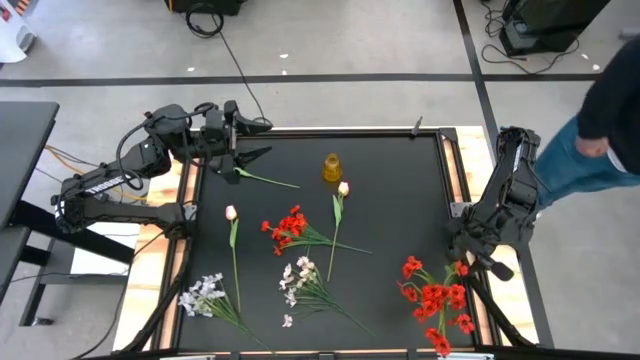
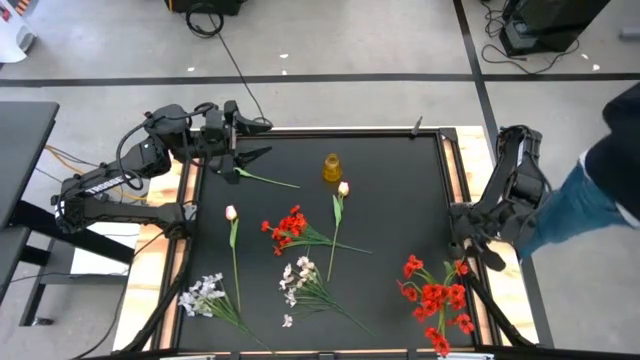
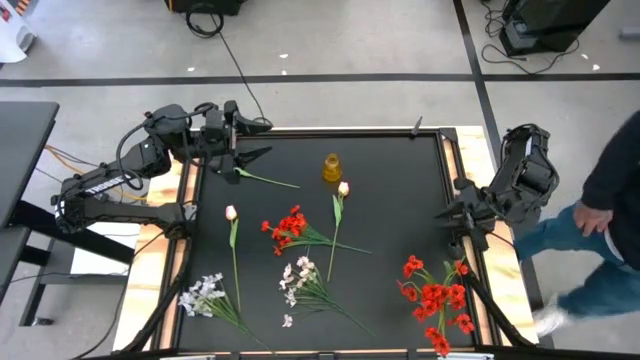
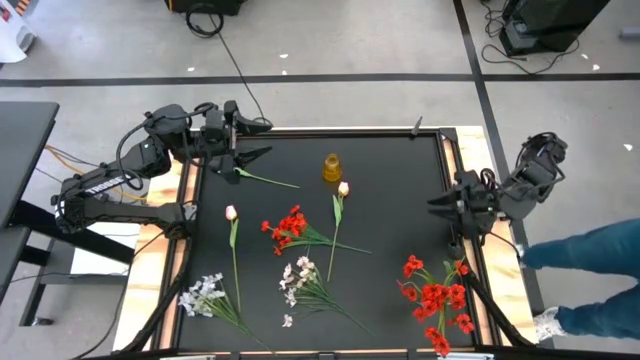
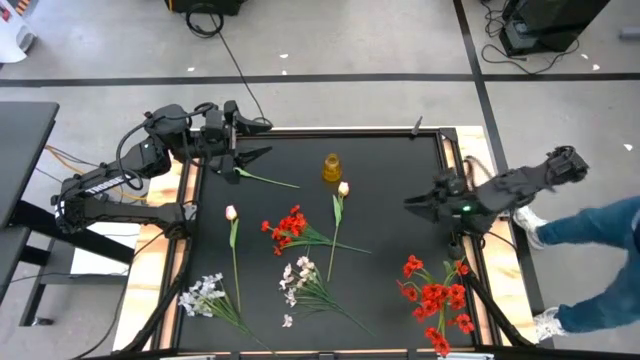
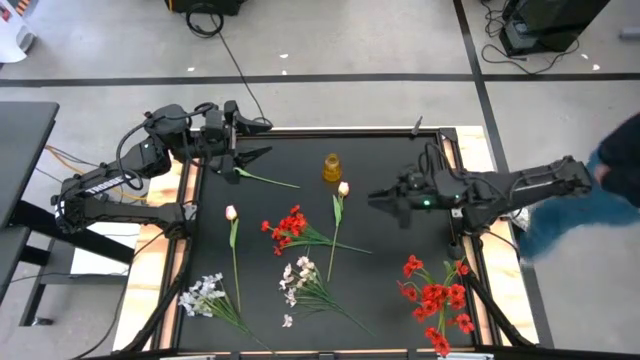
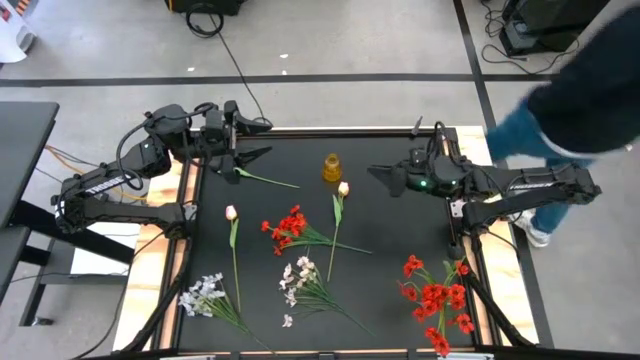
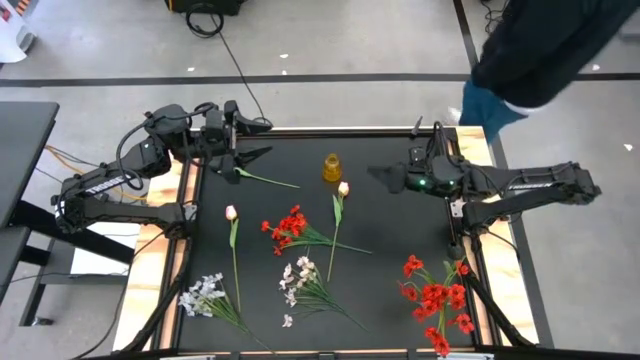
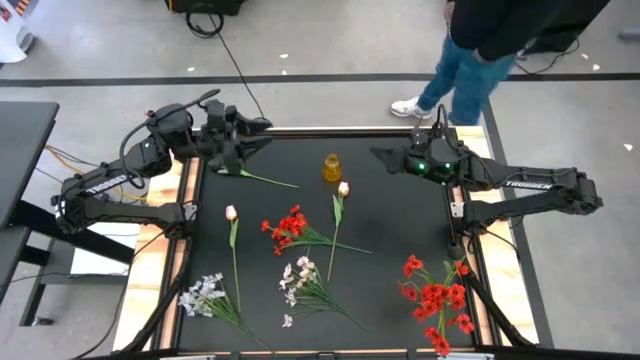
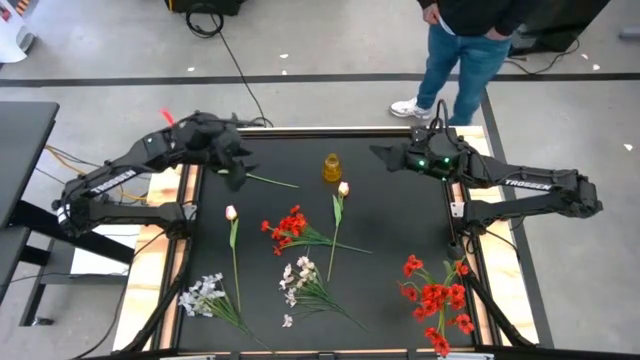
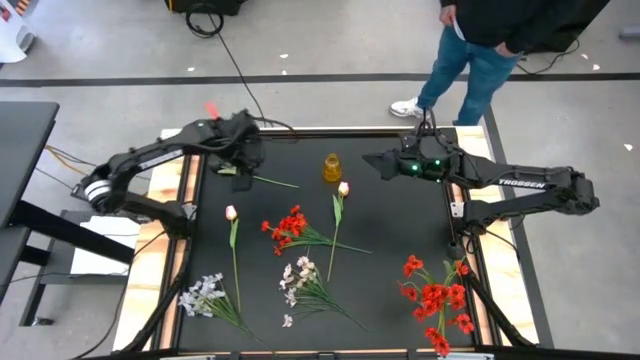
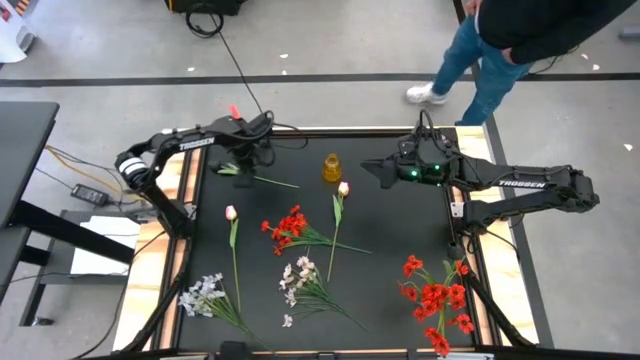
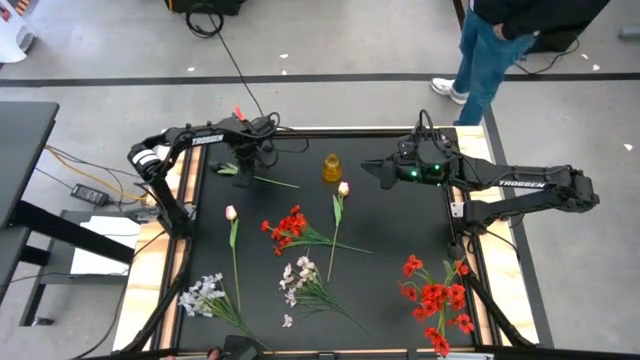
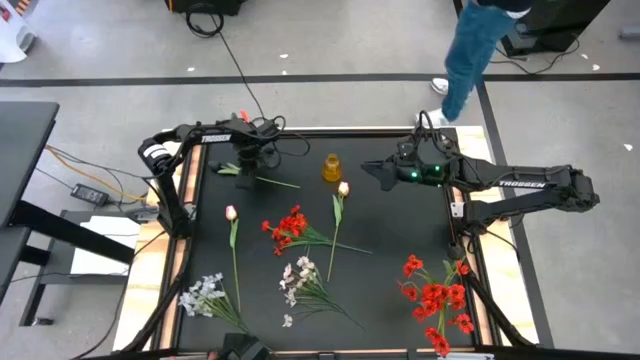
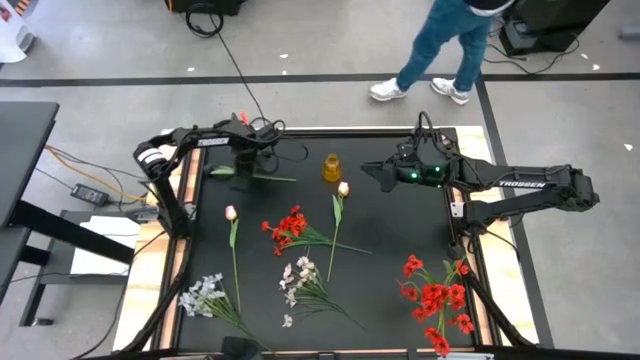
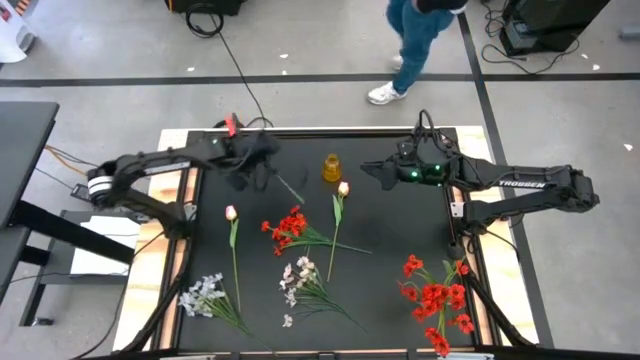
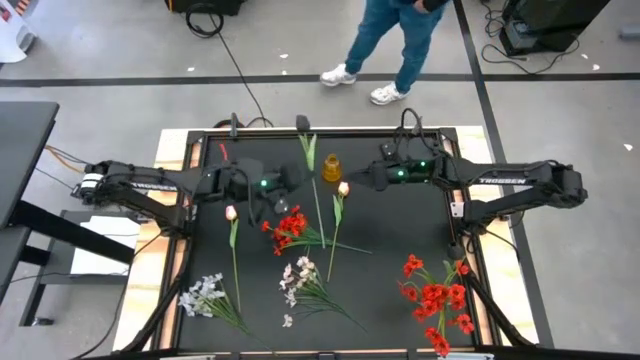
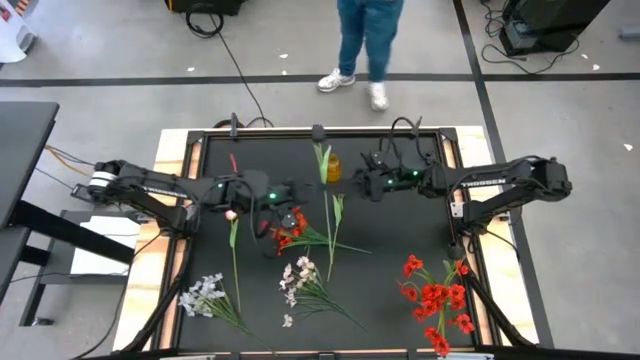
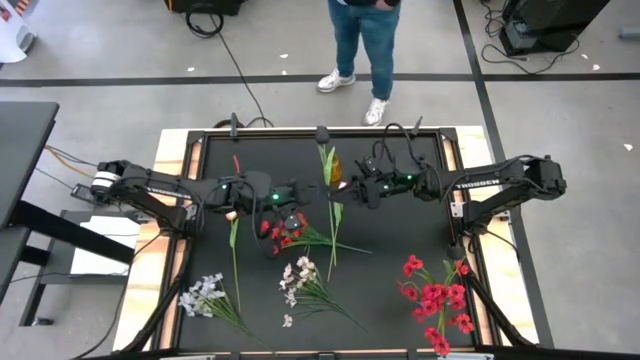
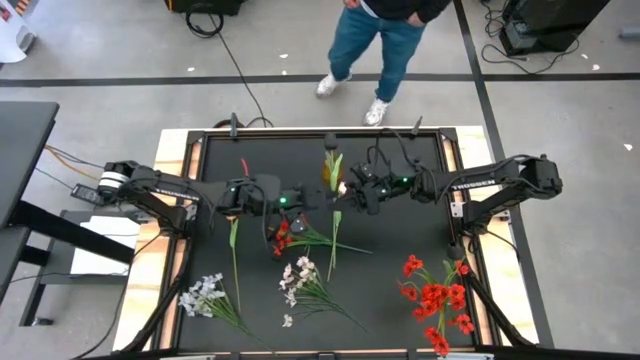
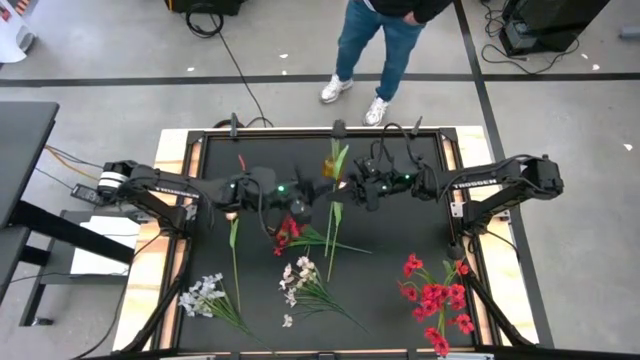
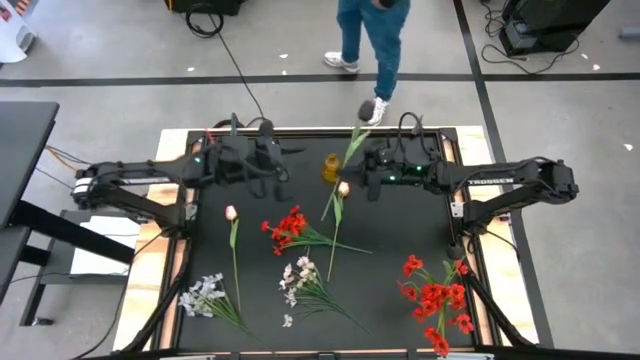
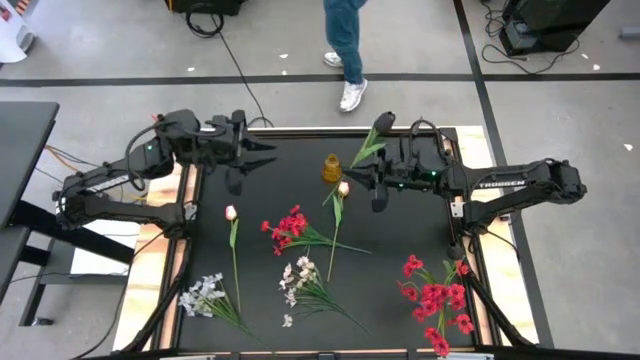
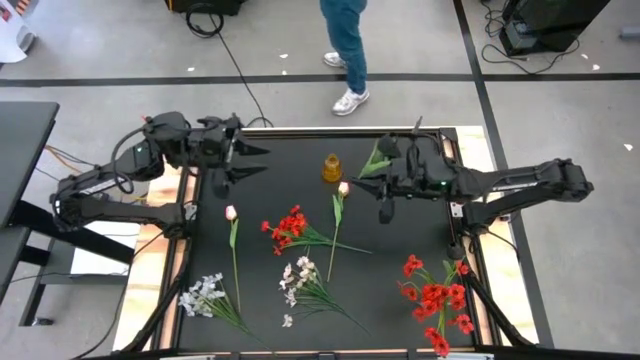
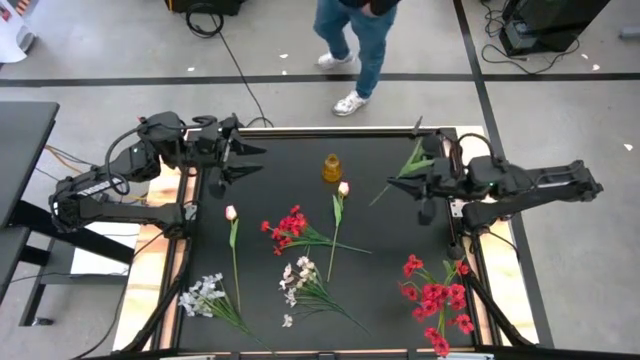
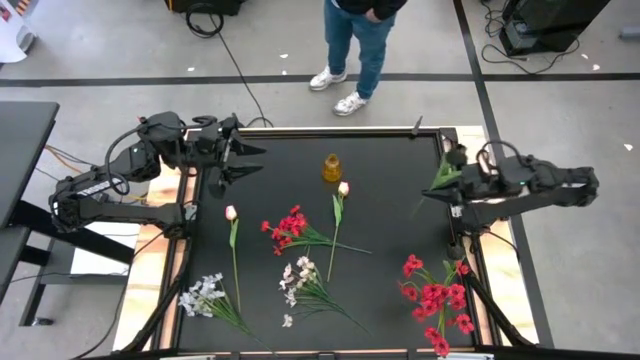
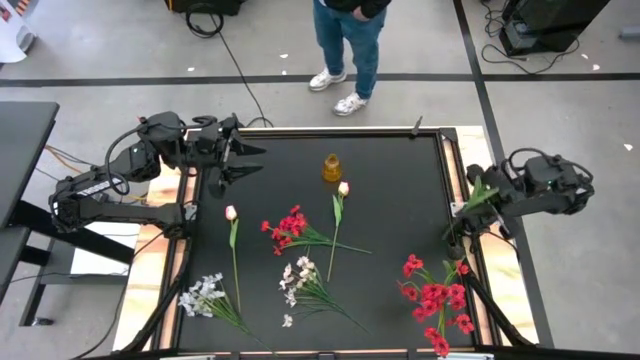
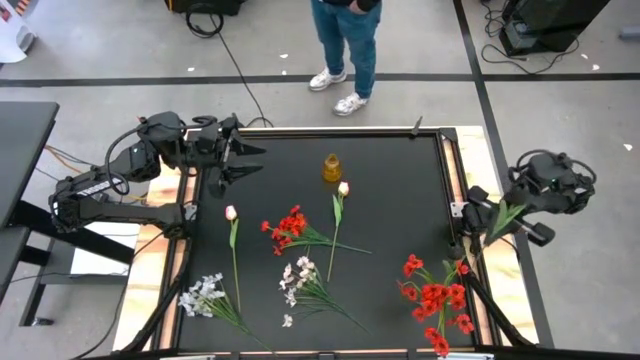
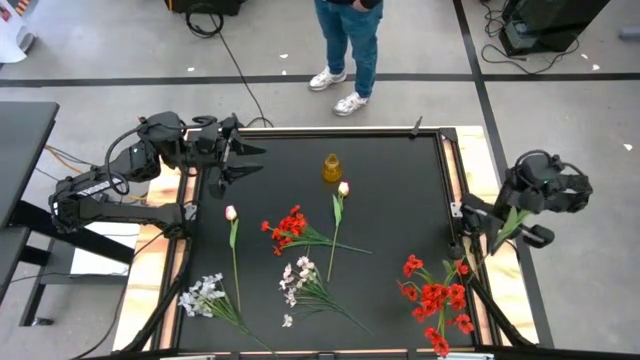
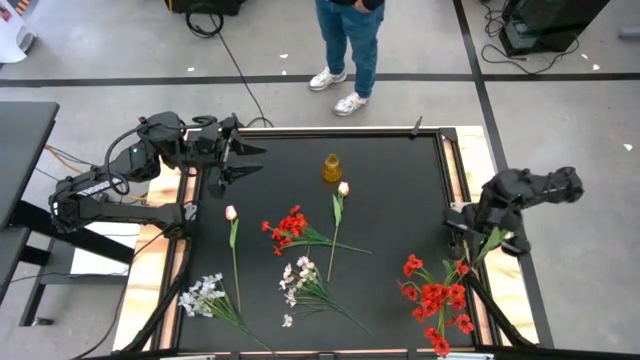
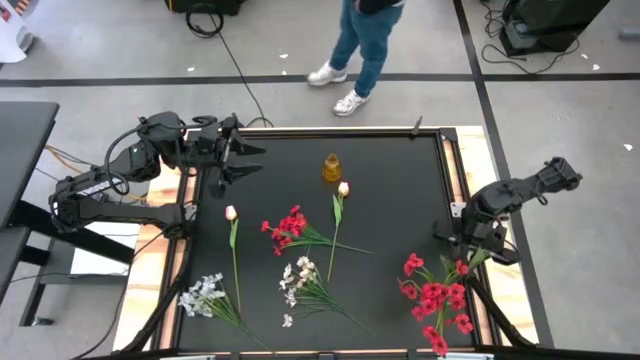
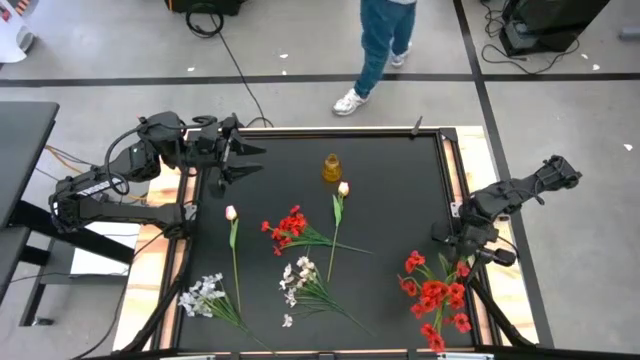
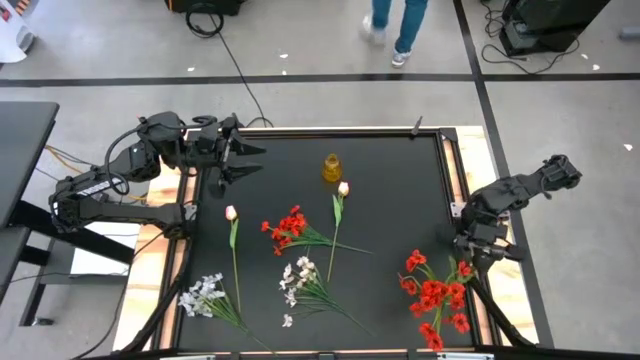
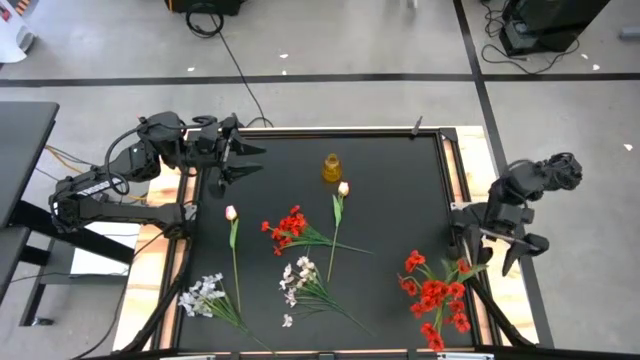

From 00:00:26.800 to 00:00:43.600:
Task: Sort flowers into vase by color
Put the black flower into the transparent vase

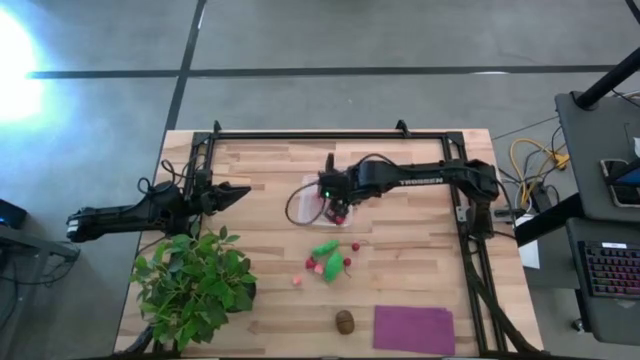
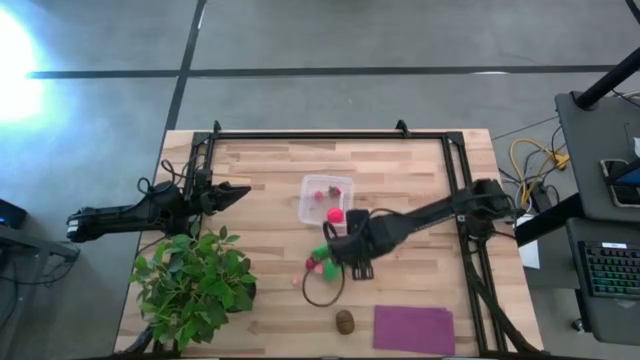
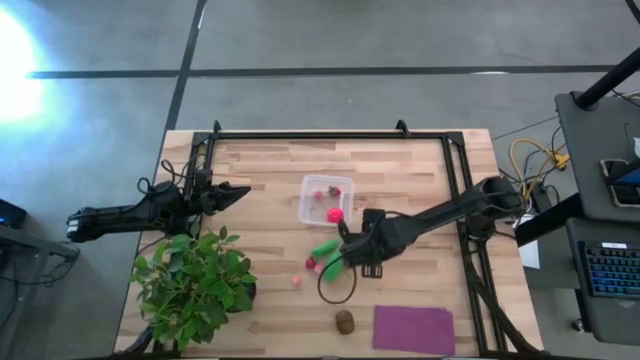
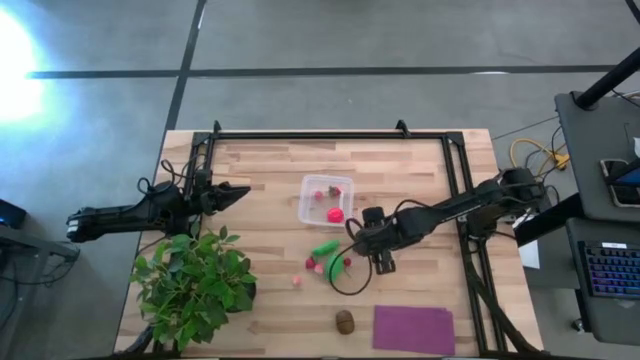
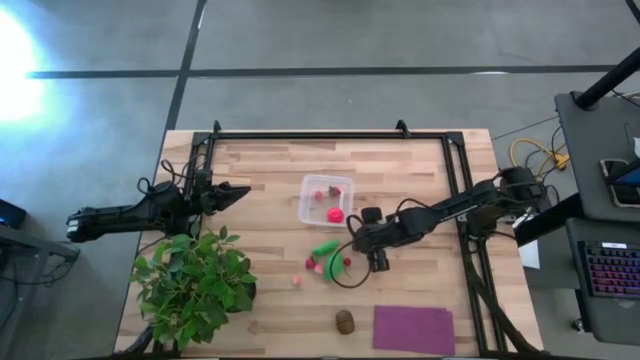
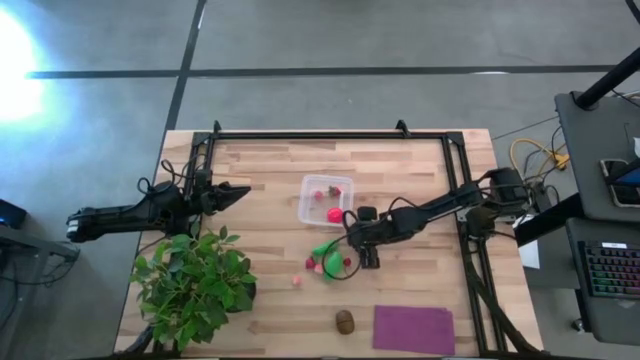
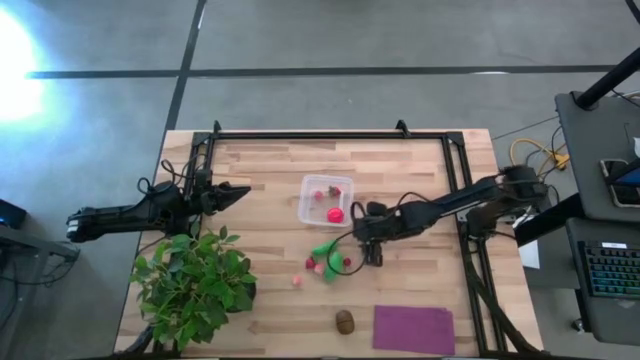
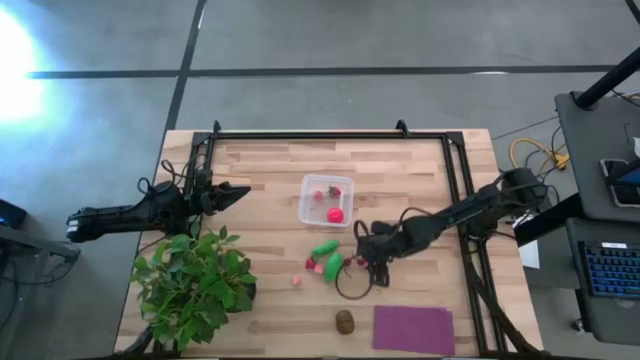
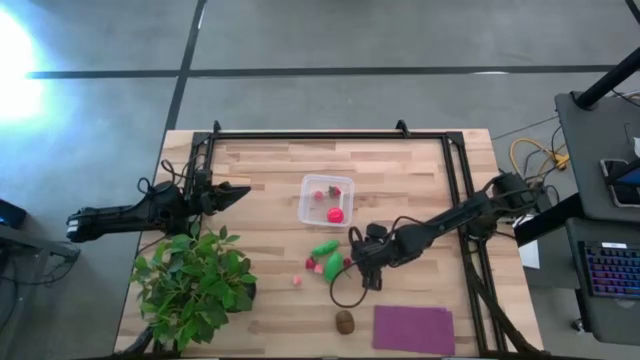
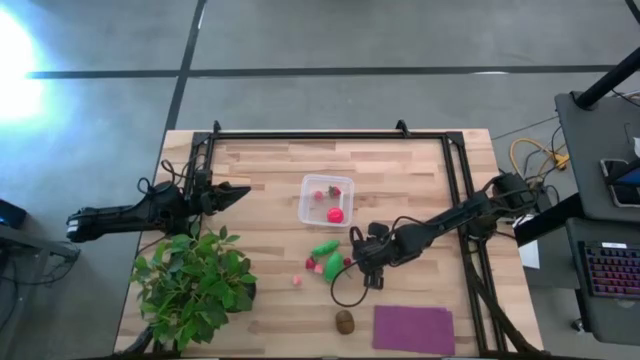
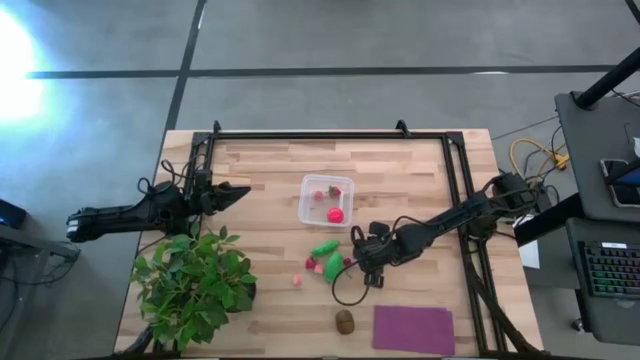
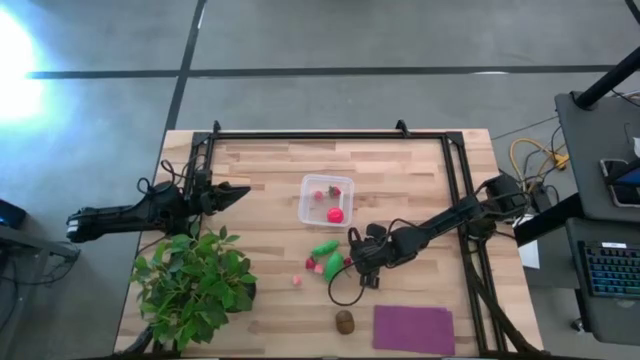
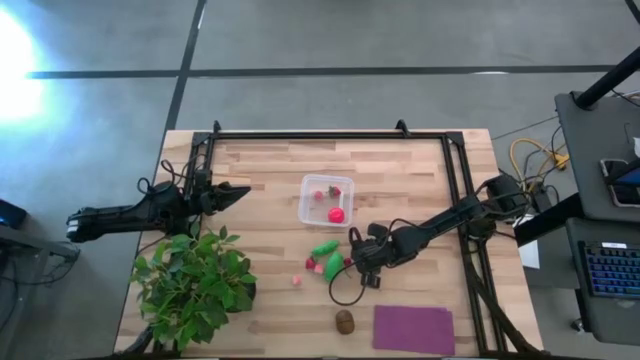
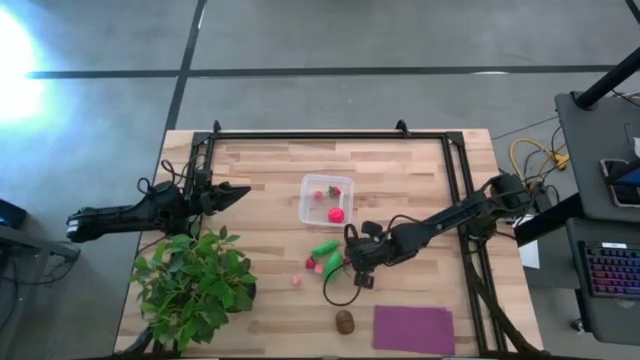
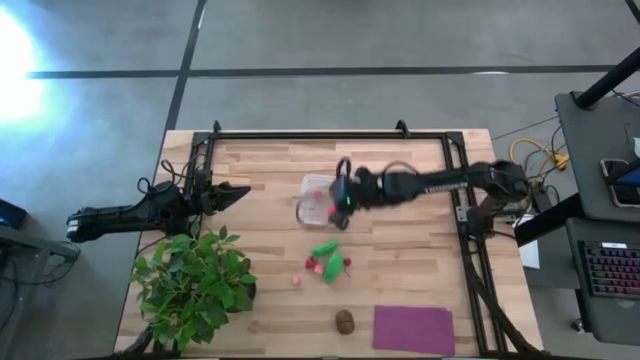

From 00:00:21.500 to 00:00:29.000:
Task: Pick and placing Produce into tupperware
Put the right red cherry into the transparent bin
